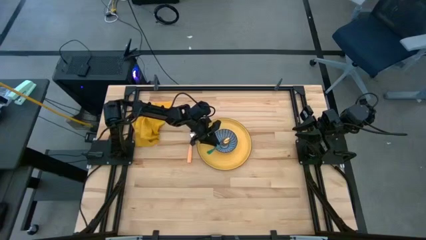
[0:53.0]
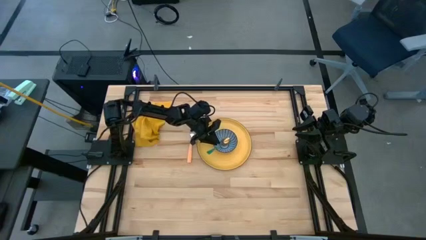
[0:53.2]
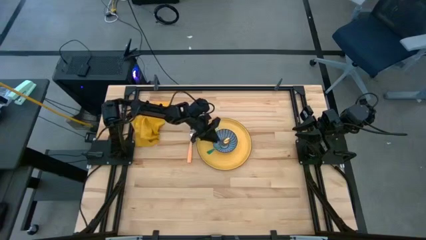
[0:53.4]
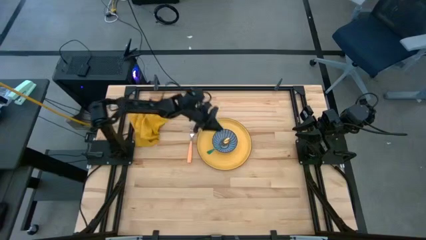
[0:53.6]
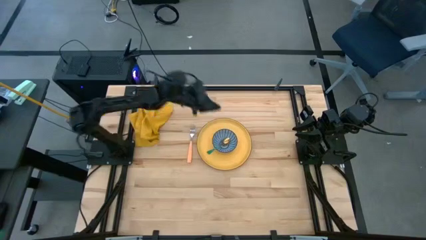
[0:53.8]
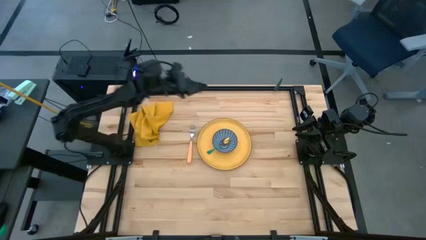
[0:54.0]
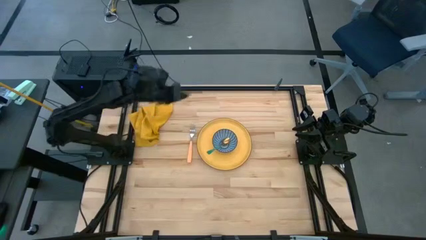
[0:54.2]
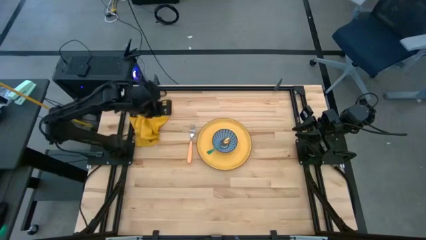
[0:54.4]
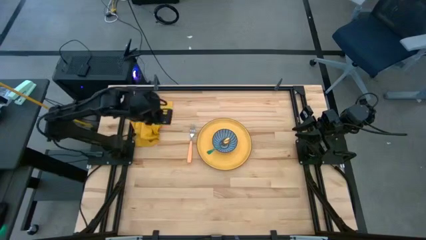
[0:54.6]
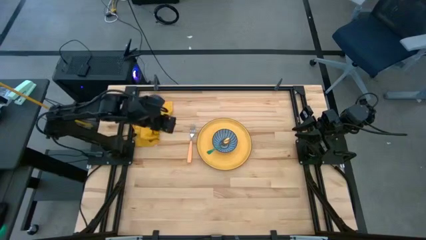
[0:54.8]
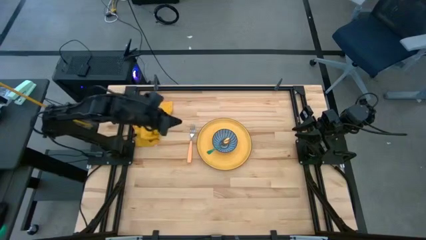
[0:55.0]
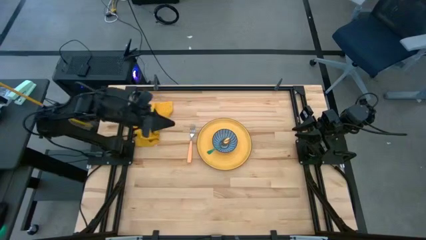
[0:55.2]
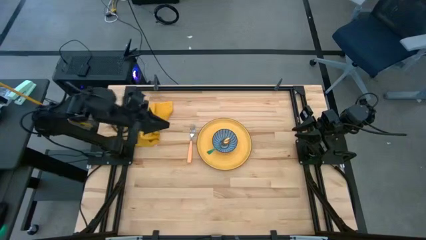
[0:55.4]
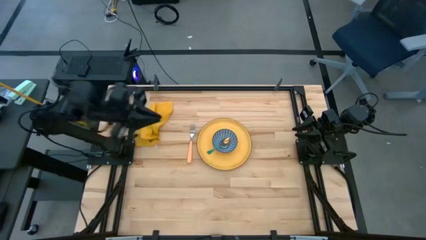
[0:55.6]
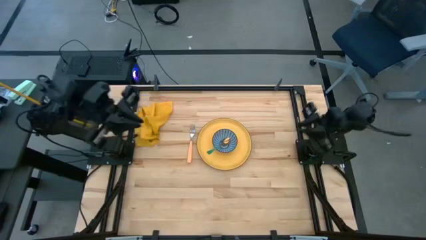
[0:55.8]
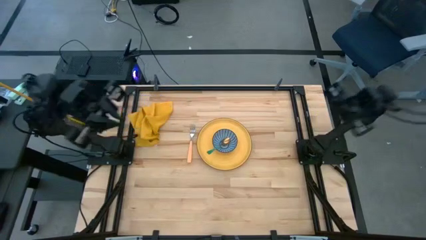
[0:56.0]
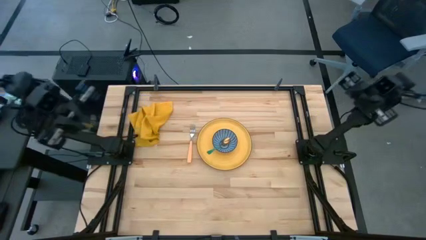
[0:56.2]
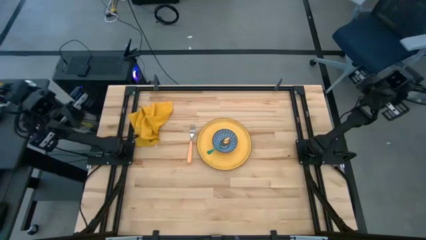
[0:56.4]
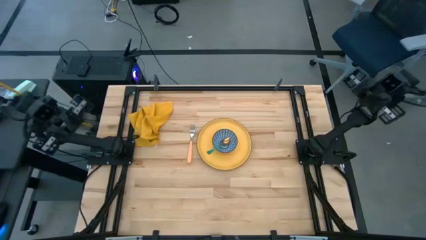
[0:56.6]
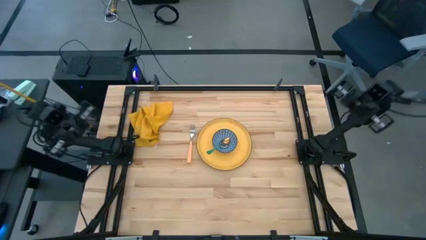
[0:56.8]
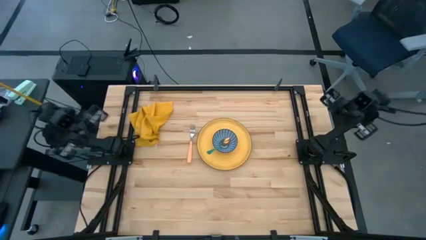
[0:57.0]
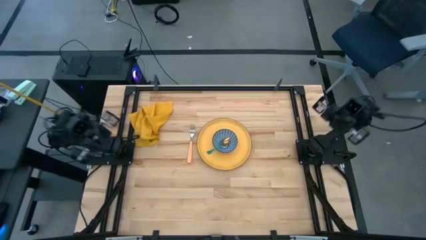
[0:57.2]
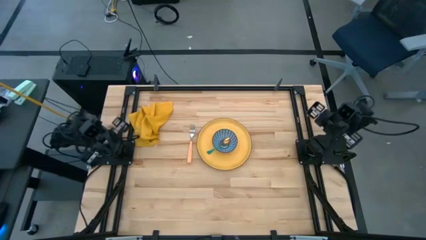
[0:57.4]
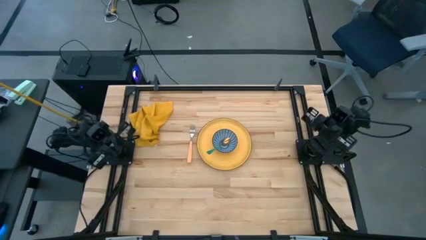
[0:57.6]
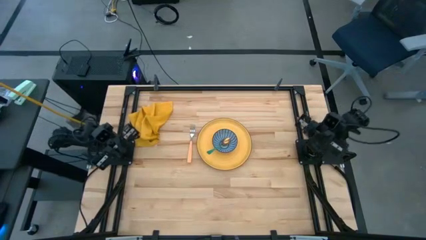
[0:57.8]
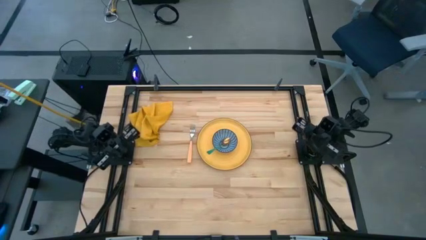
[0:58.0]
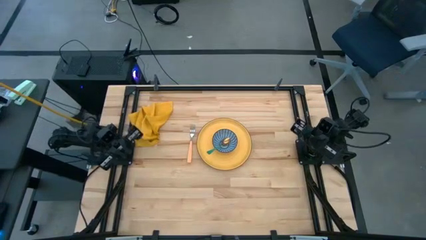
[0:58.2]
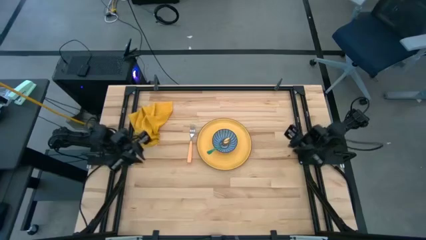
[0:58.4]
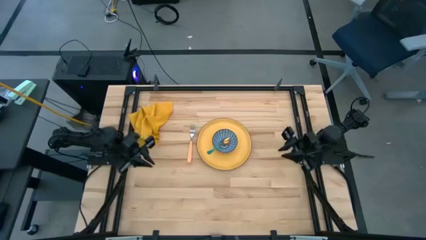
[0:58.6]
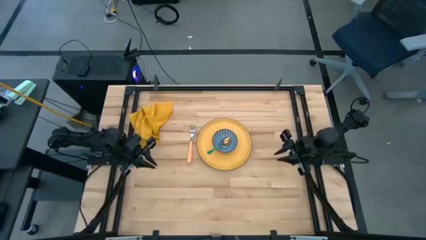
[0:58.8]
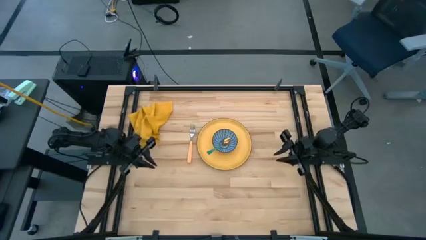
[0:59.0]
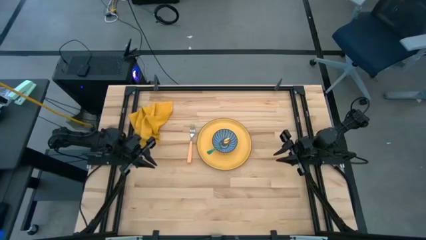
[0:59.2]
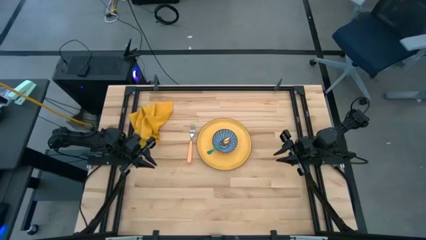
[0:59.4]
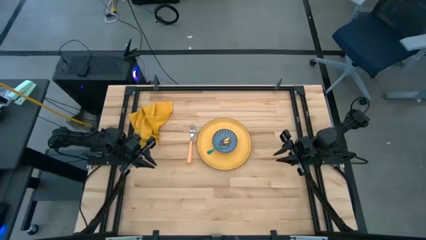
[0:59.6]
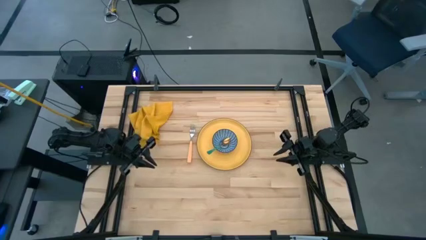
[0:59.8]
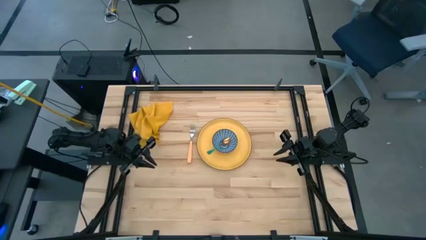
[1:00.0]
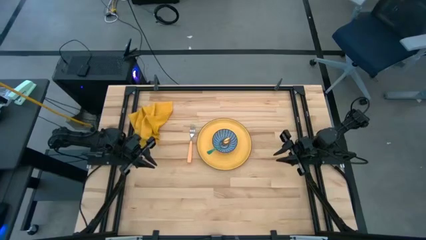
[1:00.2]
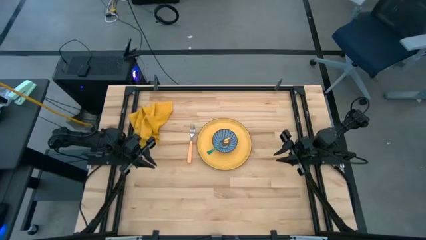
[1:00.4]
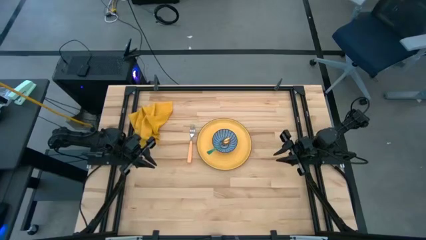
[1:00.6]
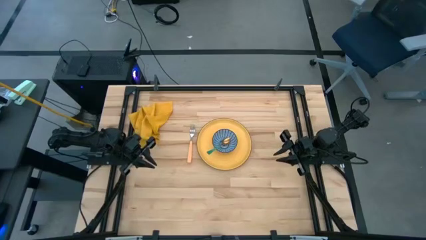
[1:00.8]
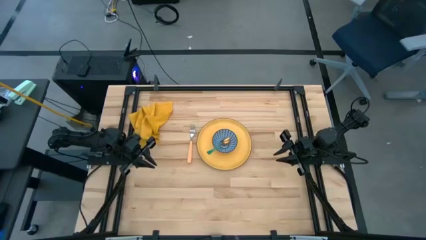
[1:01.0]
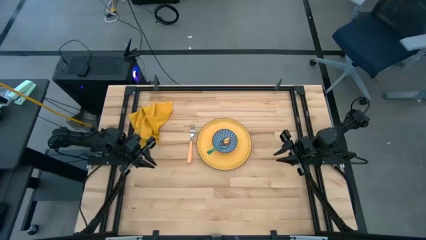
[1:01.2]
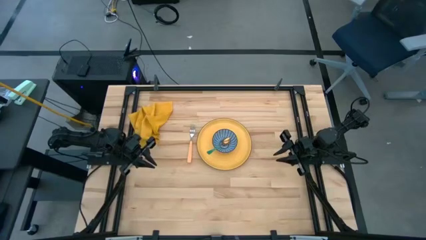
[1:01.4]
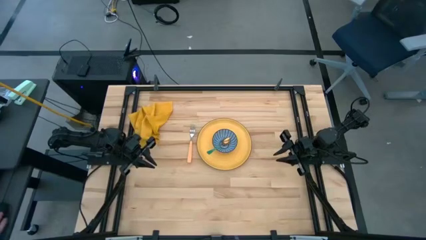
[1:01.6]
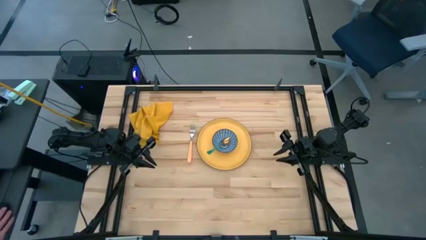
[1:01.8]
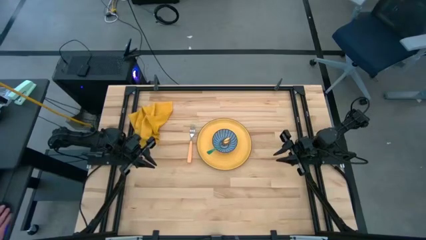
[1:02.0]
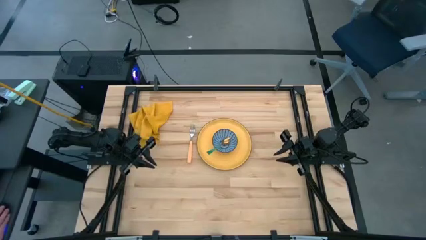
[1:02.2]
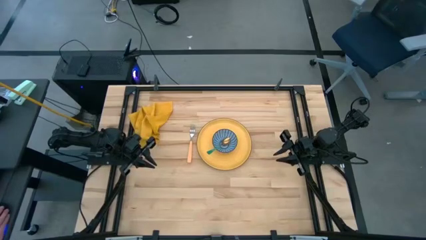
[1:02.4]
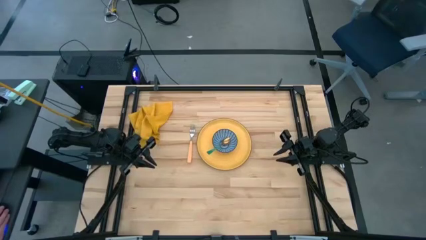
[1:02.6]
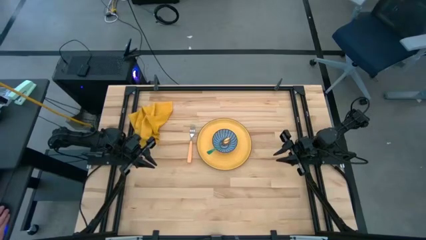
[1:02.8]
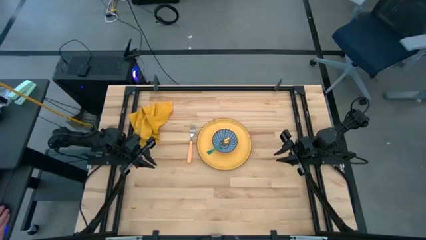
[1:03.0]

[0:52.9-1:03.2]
Task: Set table place
Return to Home Position
